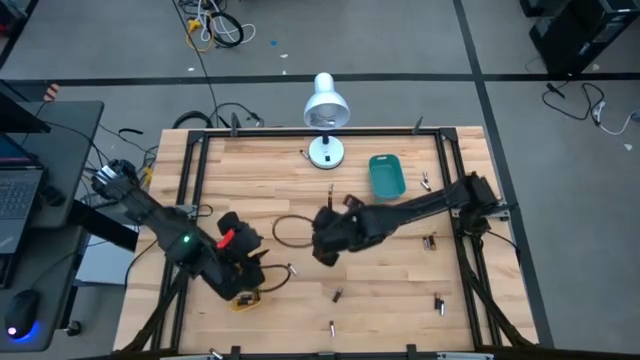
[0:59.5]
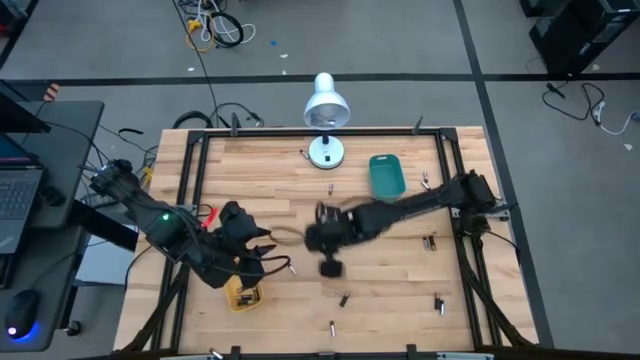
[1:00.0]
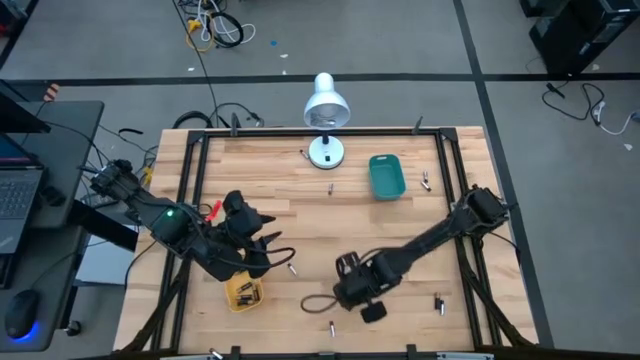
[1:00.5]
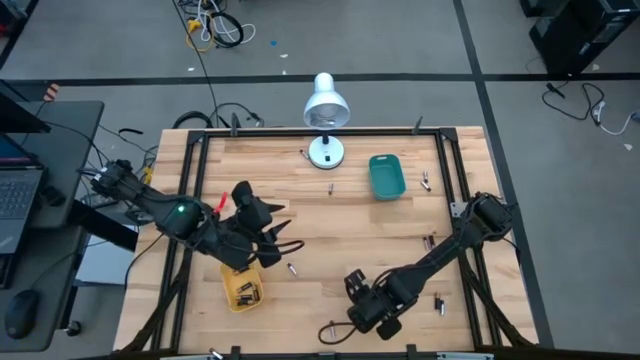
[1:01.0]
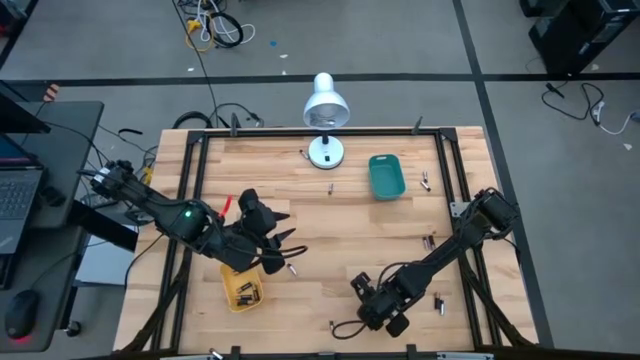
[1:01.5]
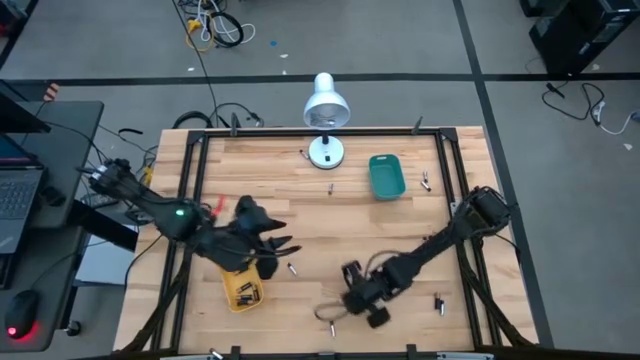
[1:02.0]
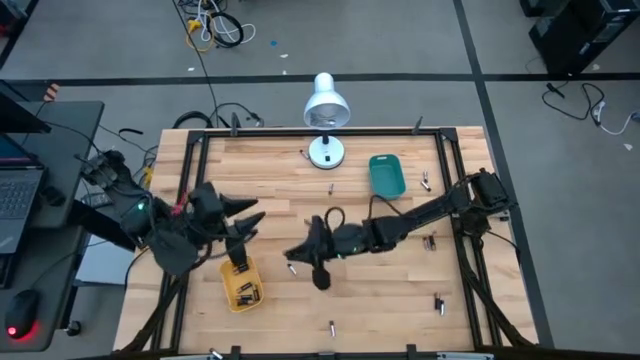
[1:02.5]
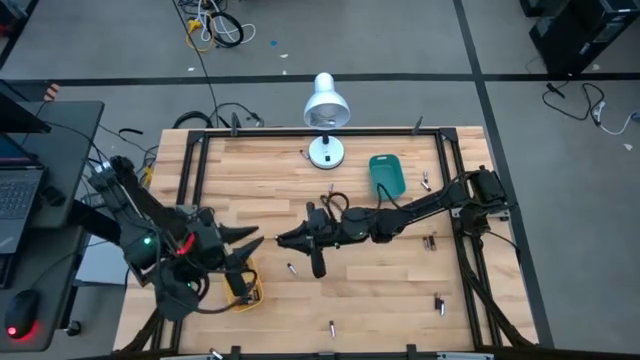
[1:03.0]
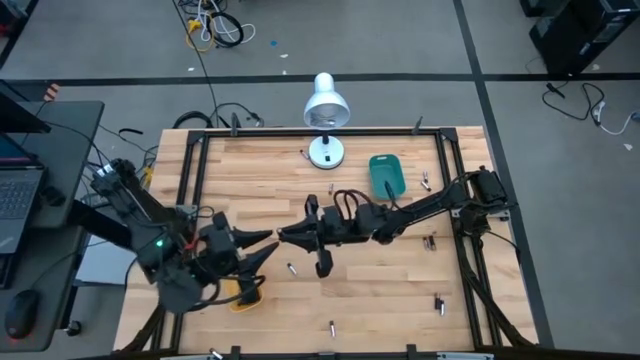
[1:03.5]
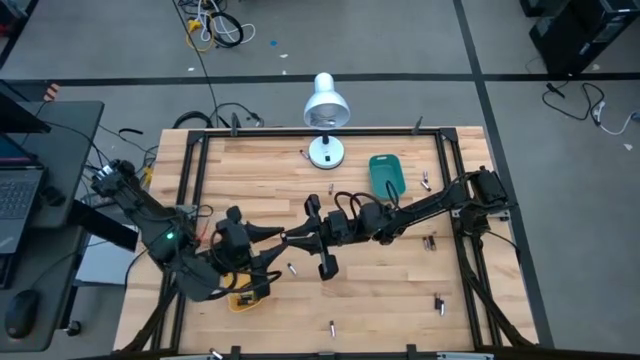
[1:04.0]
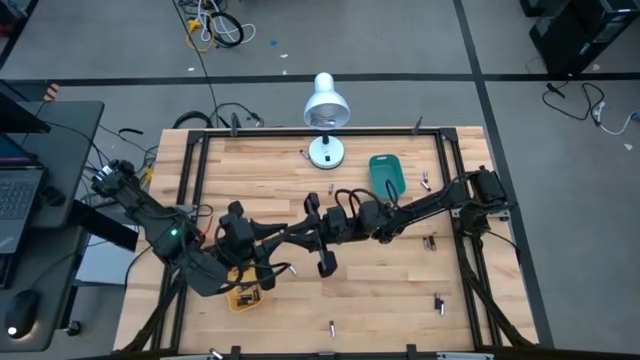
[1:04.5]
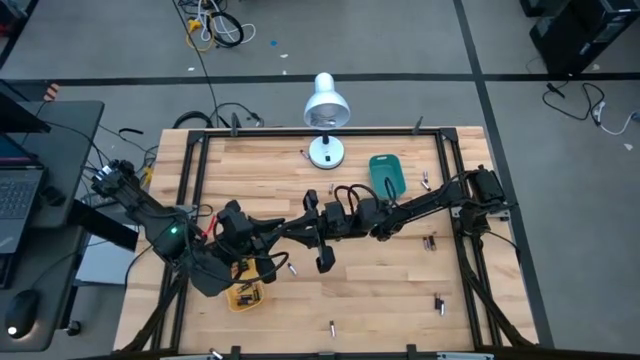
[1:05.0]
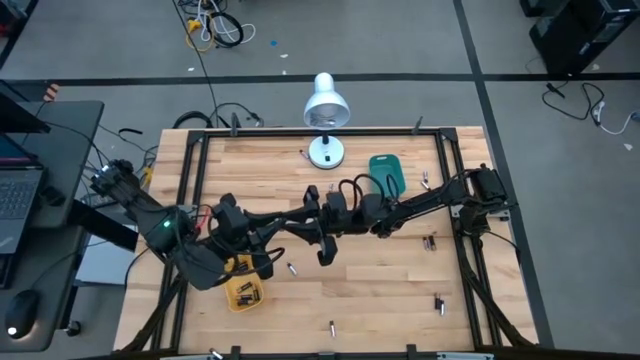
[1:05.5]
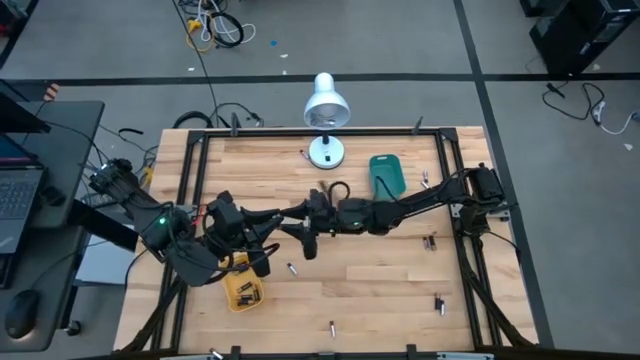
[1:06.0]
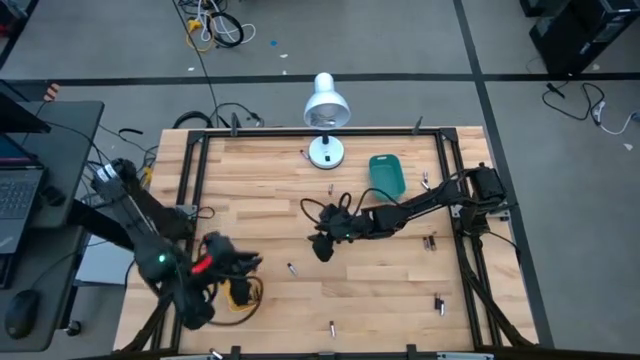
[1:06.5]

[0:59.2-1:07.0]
Task: Sort batteries
Put the bottom left golden battery into the yellow bin

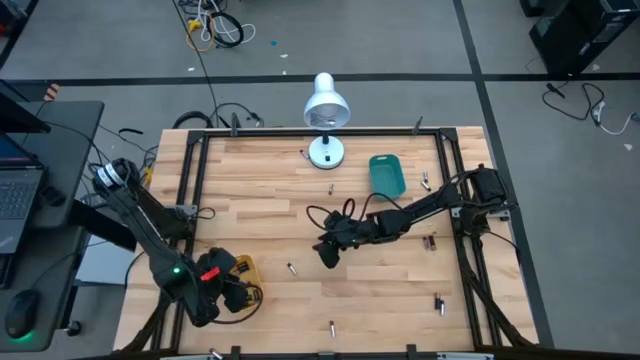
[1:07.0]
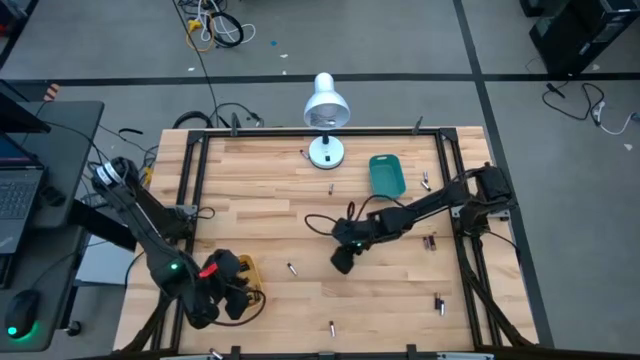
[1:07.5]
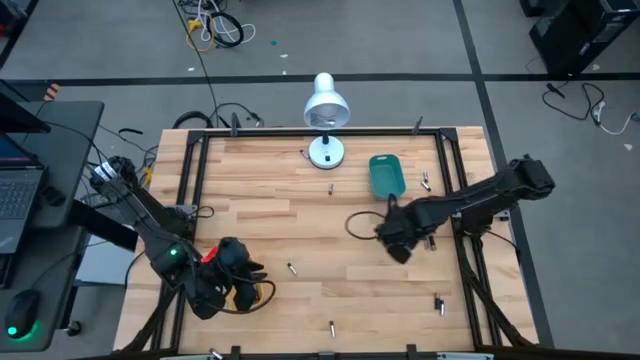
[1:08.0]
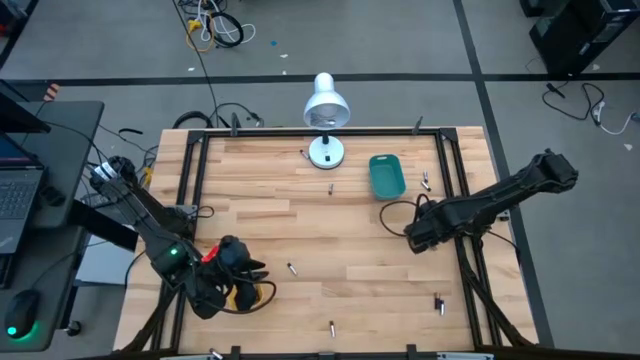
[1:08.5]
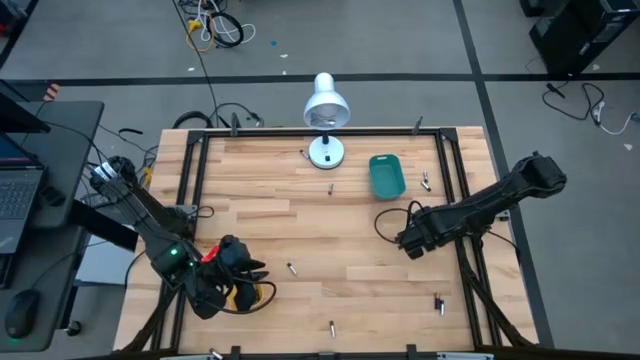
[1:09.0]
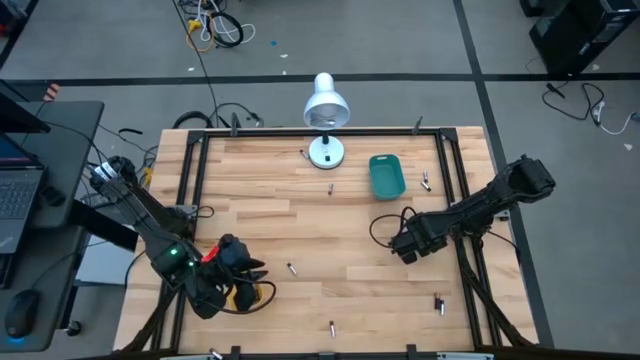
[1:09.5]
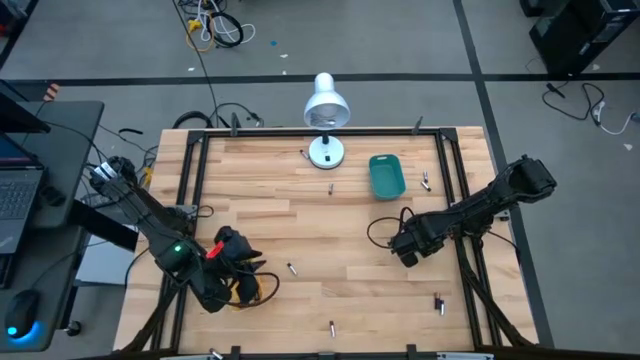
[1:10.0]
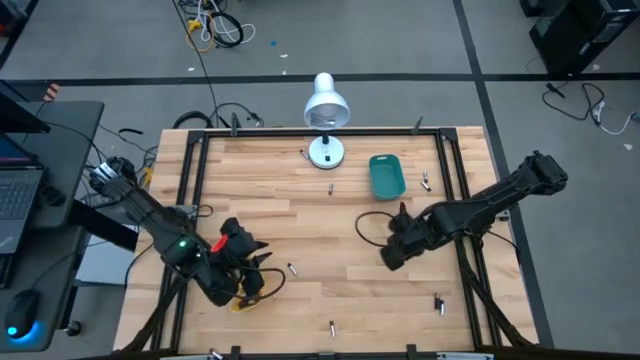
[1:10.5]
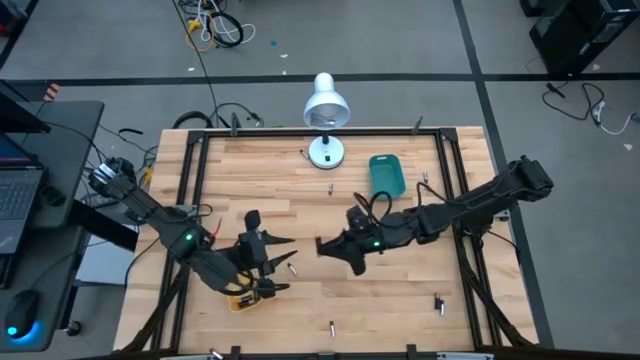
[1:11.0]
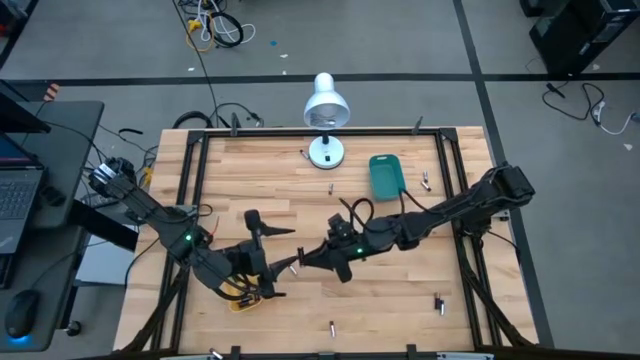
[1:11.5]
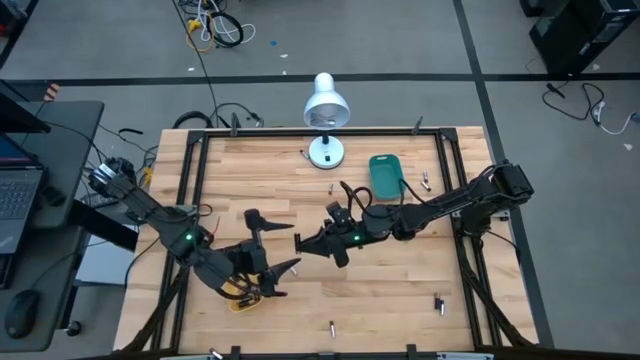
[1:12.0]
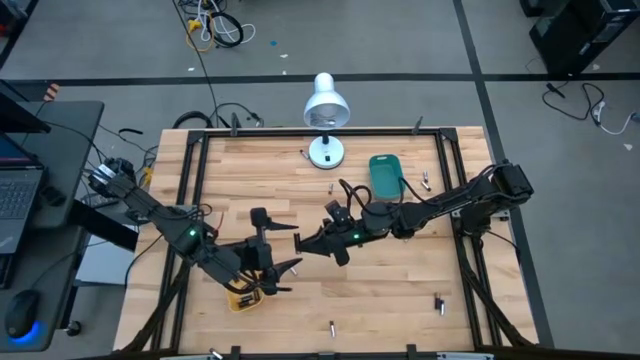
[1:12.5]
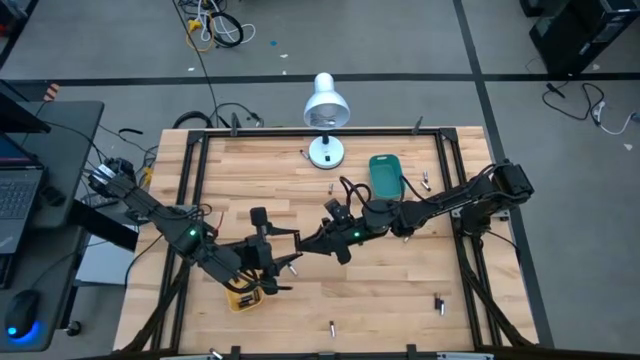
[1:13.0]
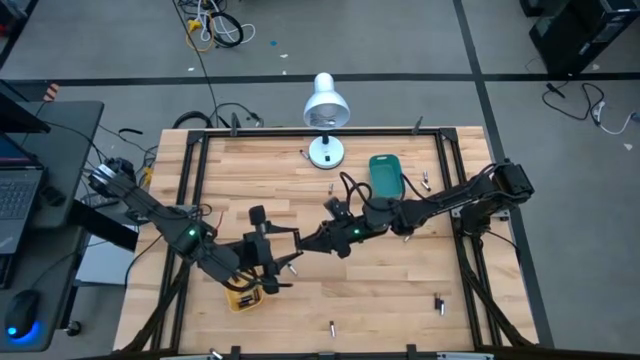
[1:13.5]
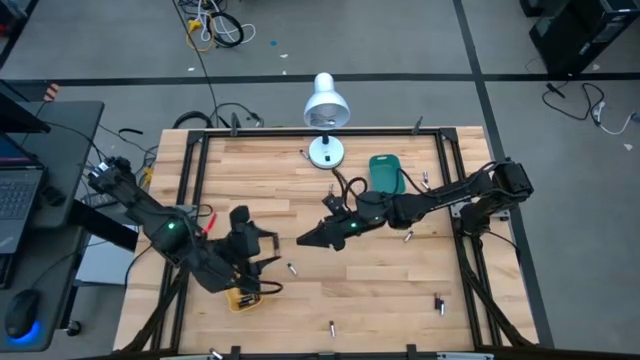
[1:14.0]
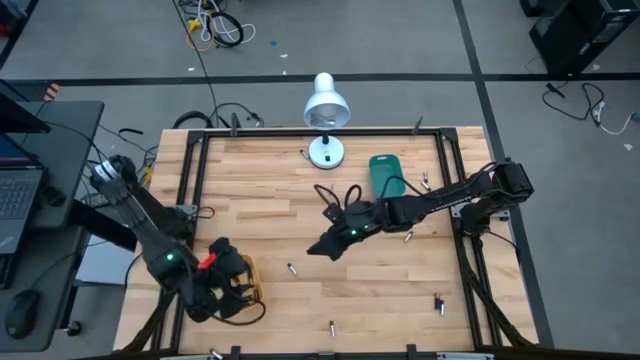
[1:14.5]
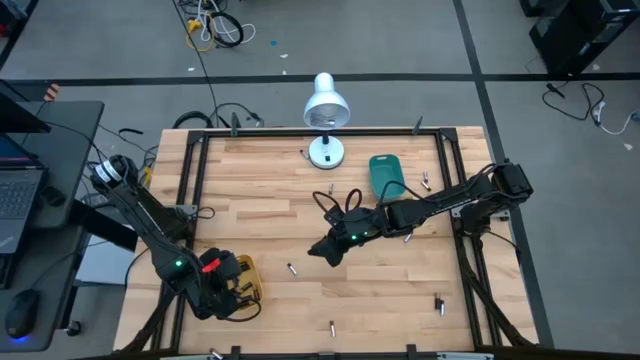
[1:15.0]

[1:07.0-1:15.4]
Put the top golden battery into the yellow bin

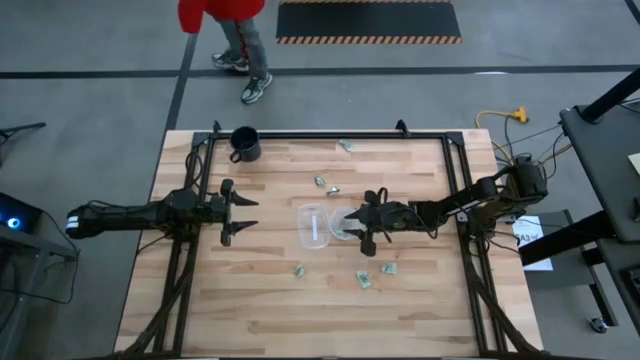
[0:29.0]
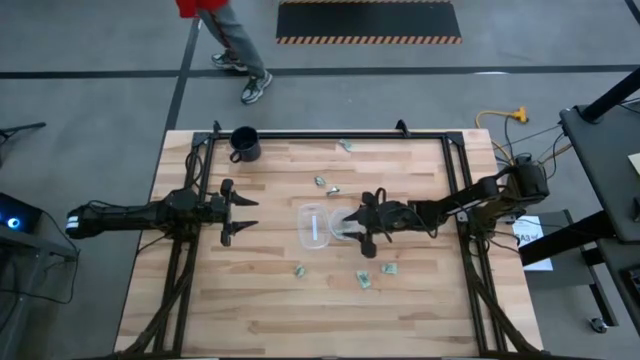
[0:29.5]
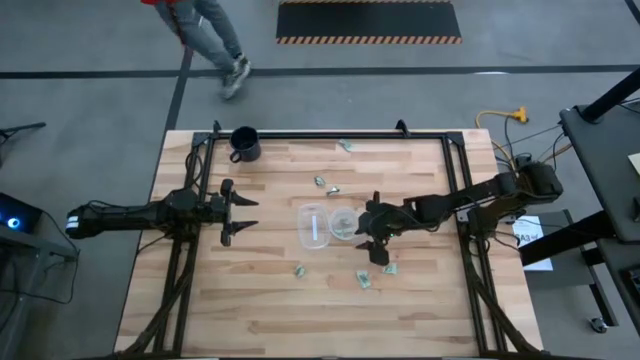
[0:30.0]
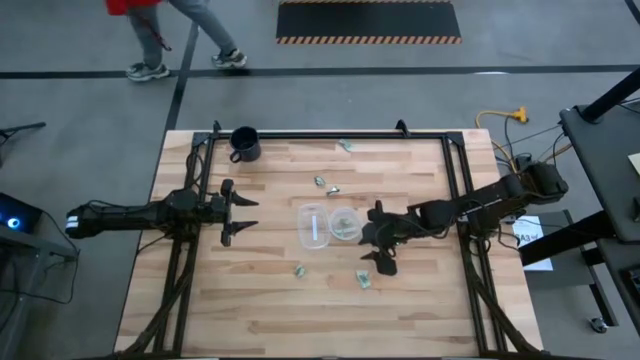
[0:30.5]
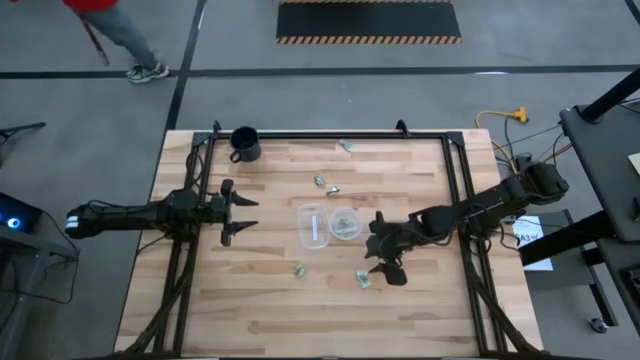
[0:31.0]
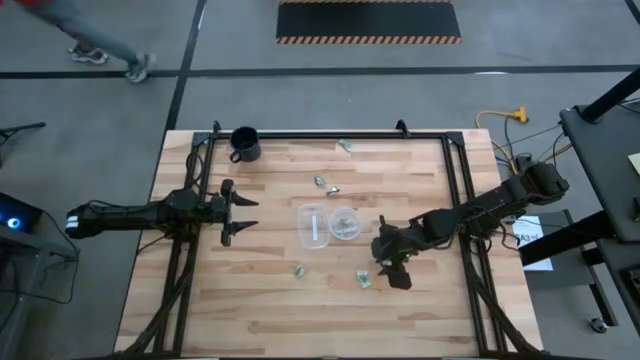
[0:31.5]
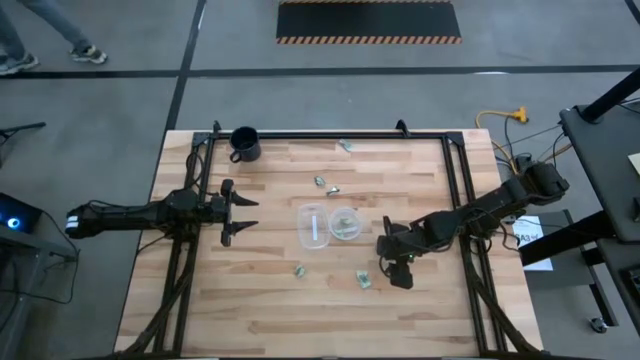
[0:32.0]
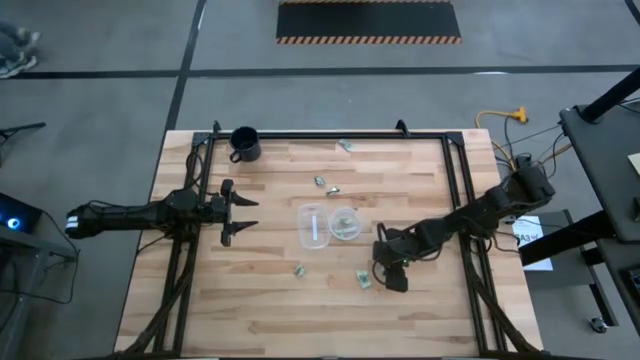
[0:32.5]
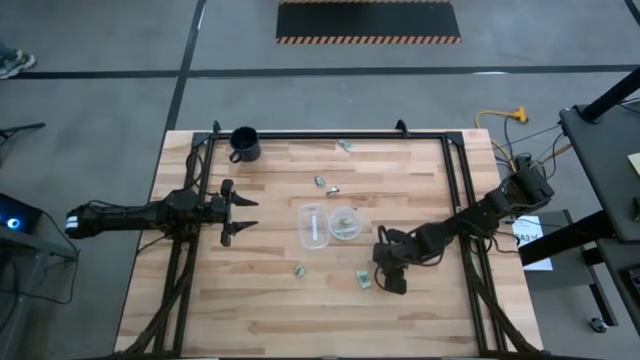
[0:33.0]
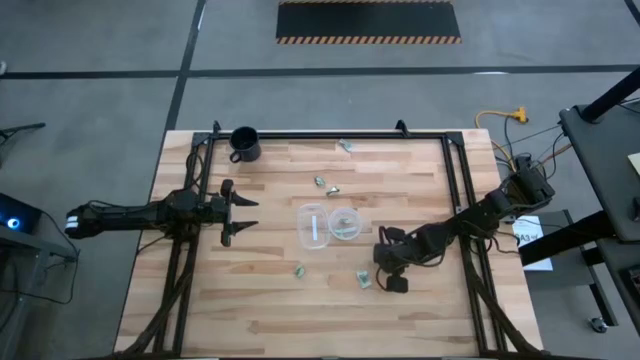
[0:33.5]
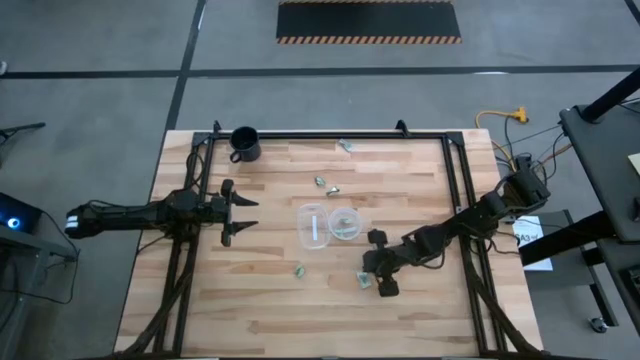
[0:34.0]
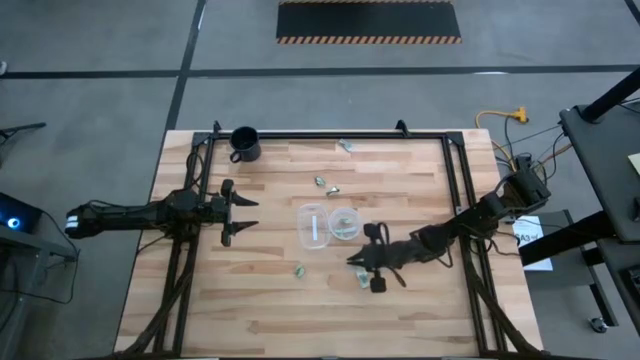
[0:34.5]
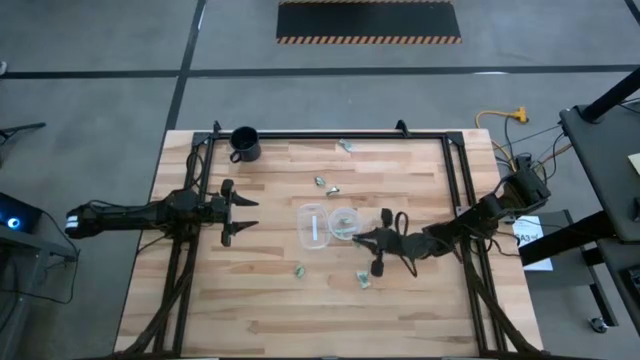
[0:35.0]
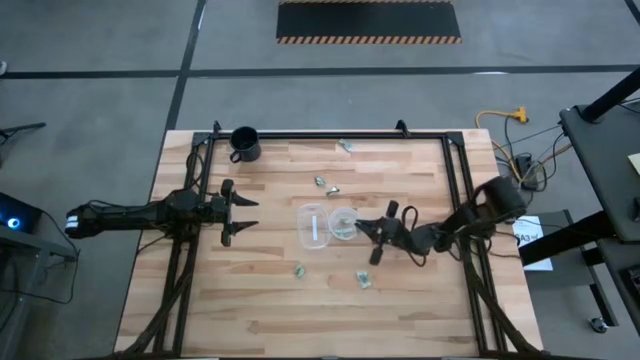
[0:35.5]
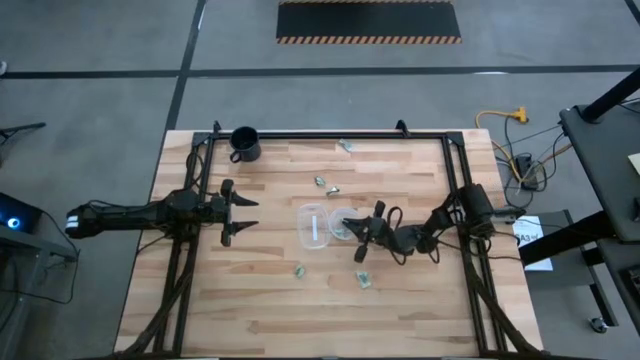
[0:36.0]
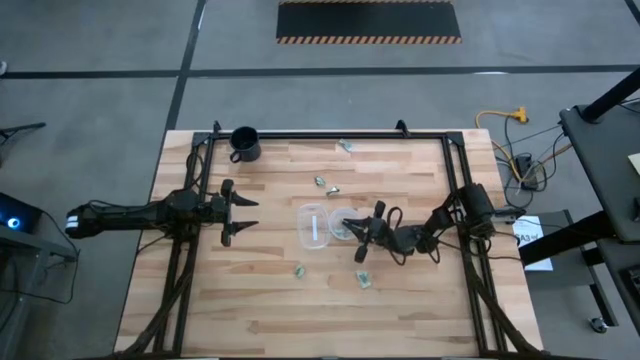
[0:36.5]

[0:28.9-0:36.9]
Task: Pick and place Stevia / Truvia into bins
Put the green stevia packet into the right transparent container
